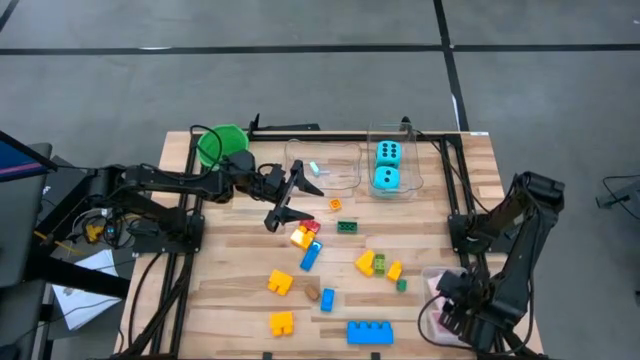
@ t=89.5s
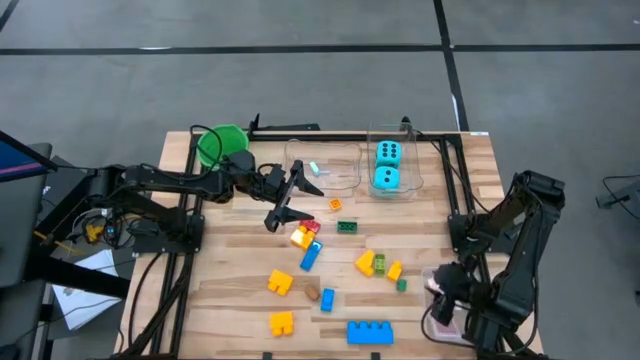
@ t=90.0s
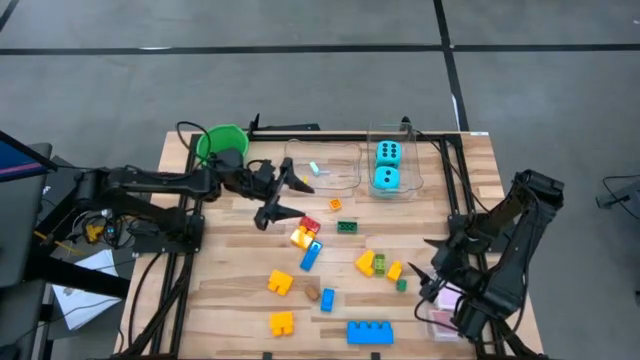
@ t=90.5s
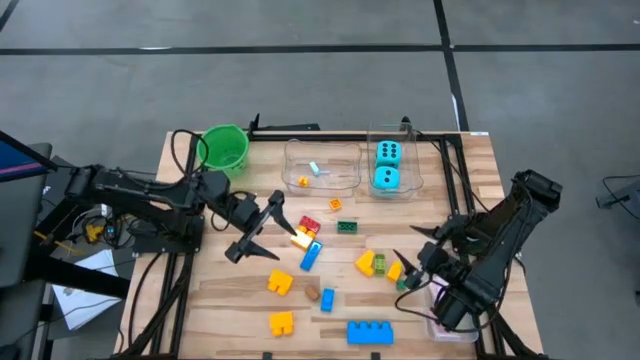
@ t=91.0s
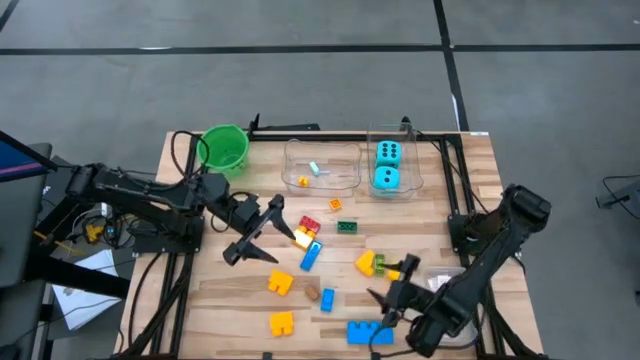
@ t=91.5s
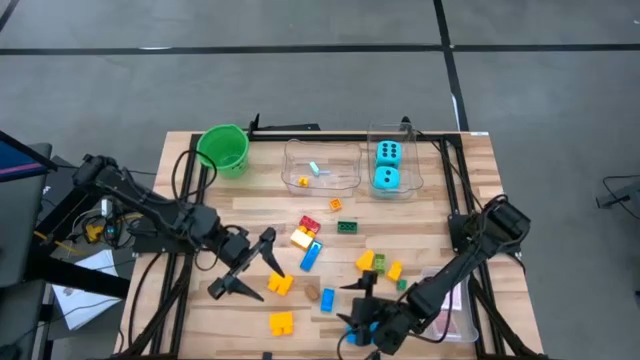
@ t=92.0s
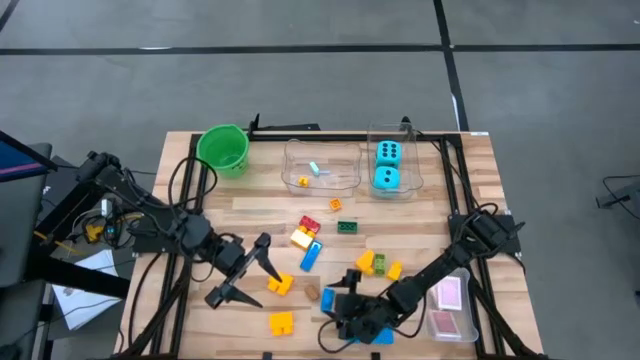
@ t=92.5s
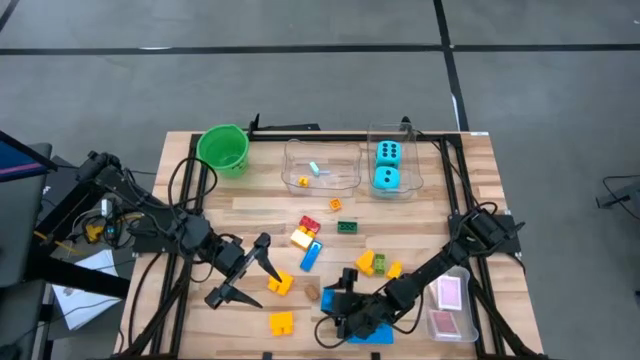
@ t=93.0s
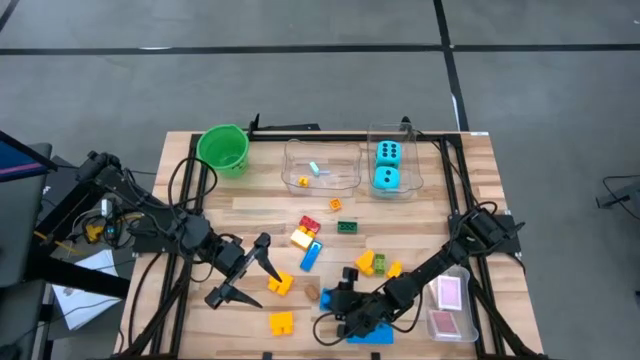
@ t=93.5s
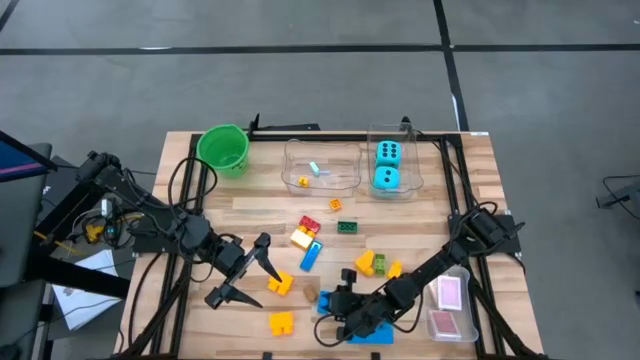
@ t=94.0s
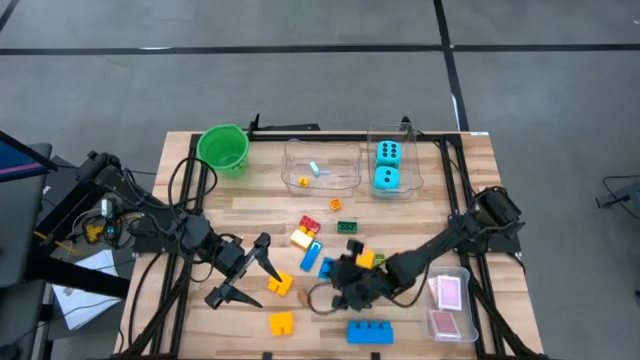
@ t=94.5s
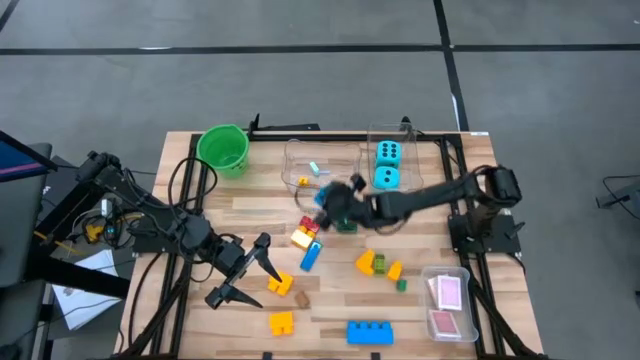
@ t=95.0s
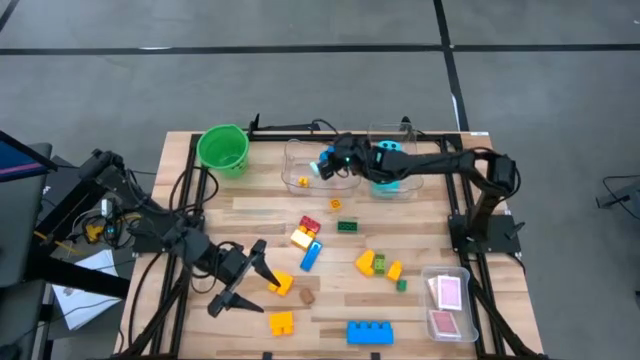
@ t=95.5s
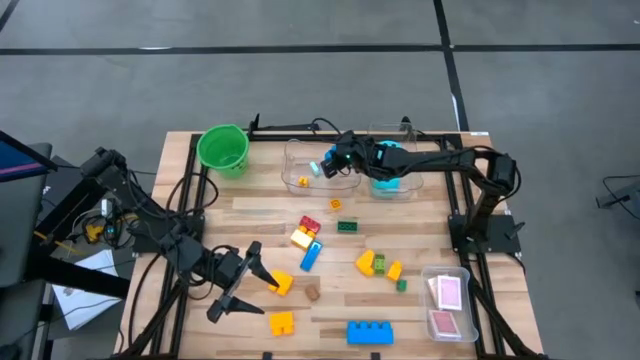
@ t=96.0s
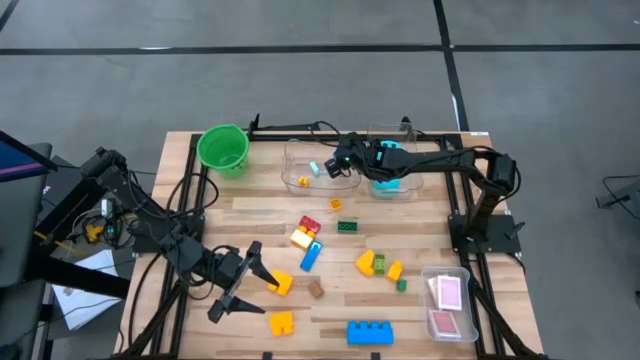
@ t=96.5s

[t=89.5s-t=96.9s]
Task: Pick & Place Toys
Put the blue gamepiece into the left transparent bin

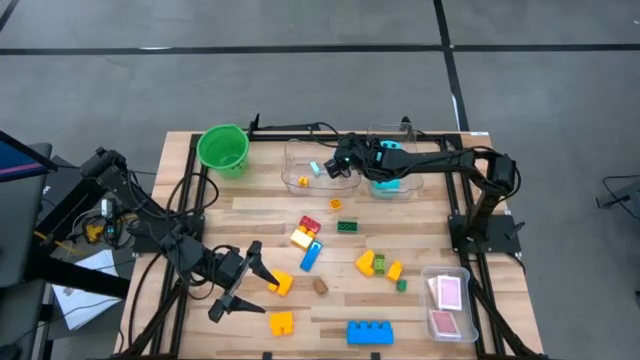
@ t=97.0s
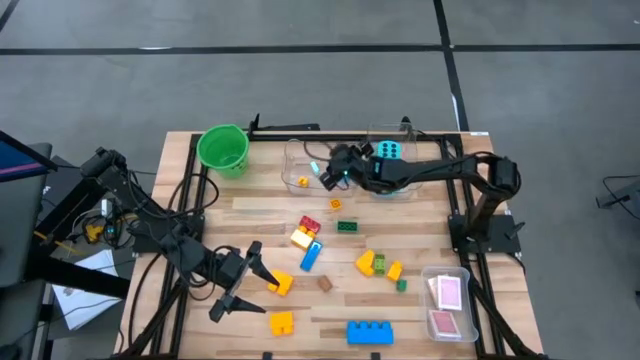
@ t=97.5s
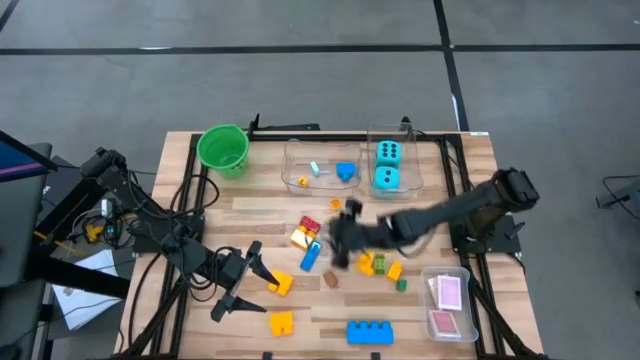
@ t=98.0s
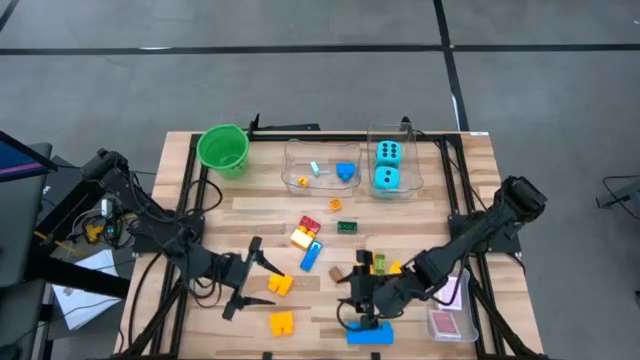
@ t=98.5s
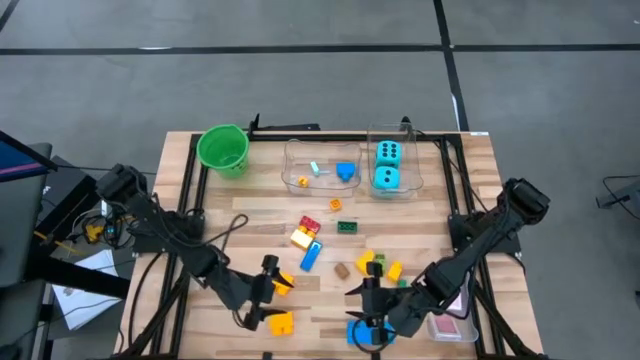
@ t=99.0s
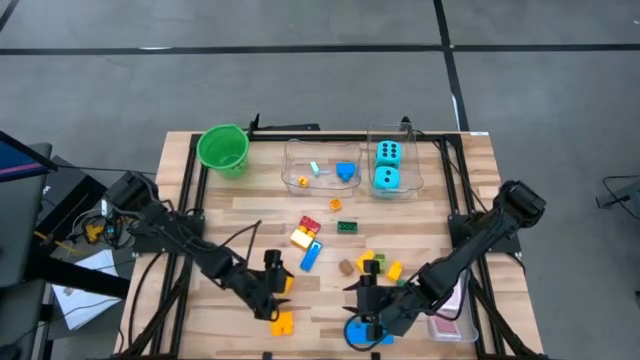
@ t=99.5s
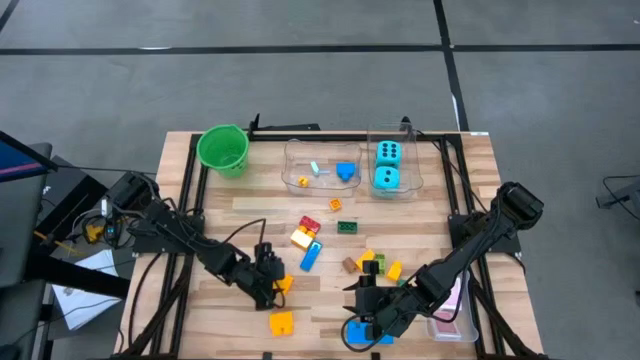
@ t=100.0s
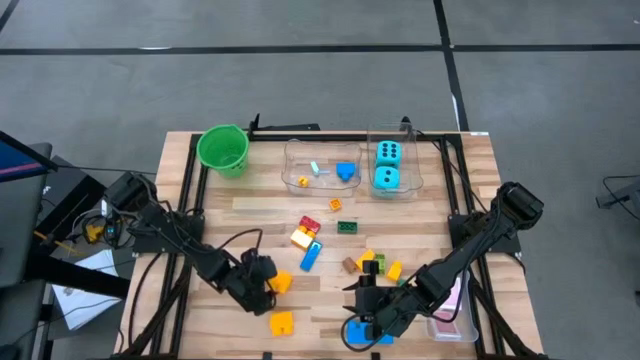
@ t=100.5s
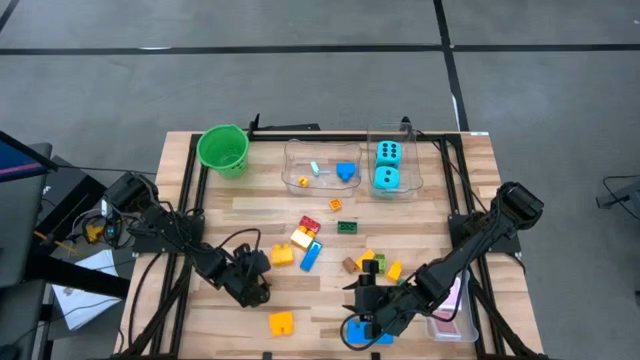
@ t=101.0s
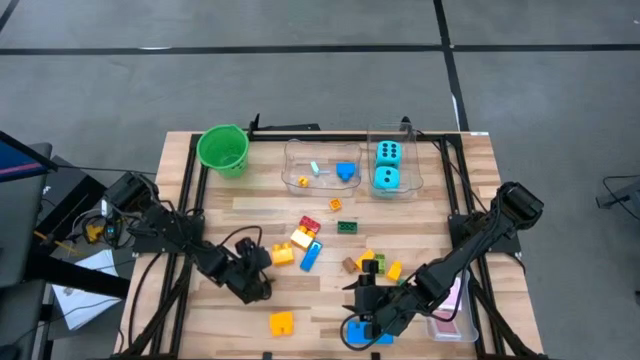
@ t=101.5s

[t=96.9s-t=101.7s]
Put the yellow gamepiece into the left transparent bin

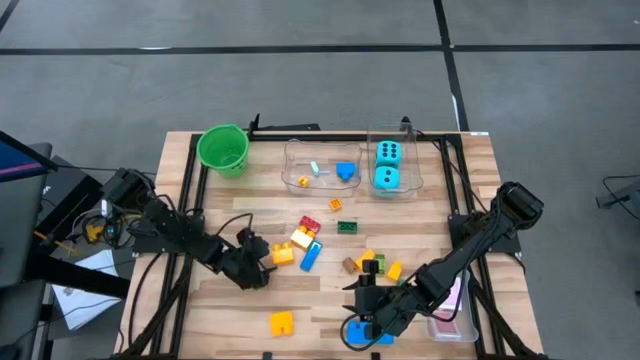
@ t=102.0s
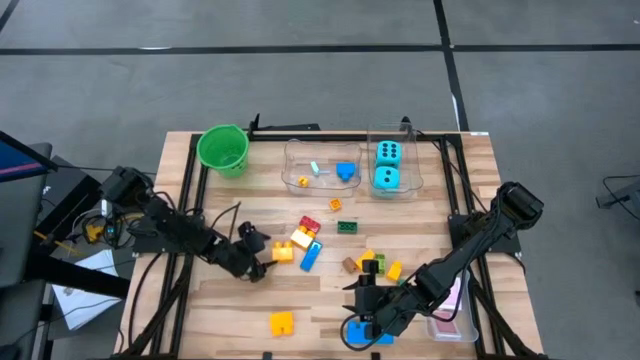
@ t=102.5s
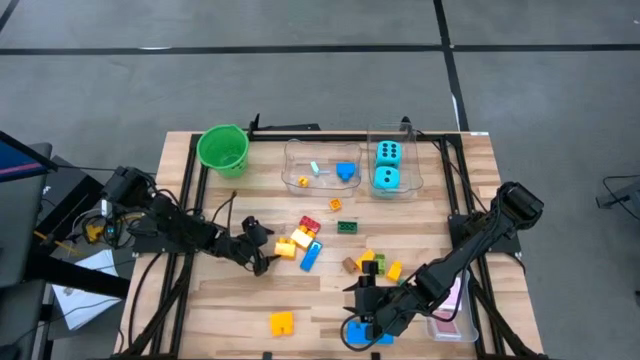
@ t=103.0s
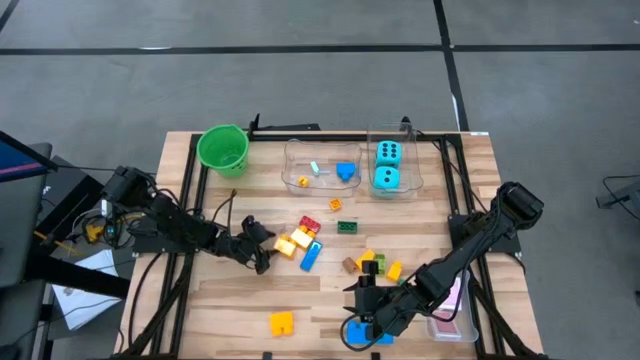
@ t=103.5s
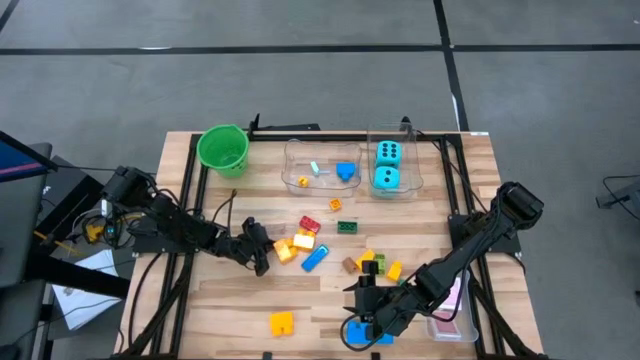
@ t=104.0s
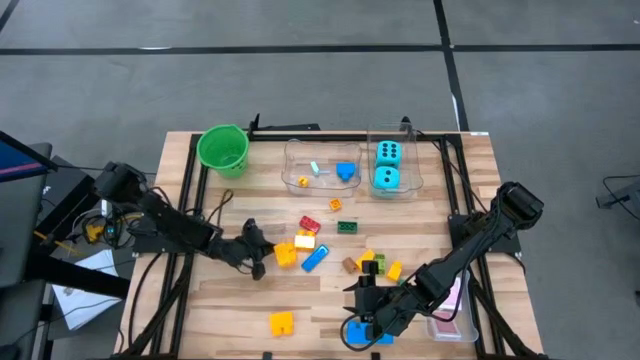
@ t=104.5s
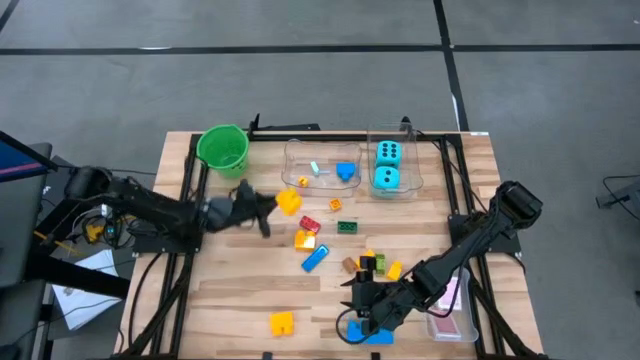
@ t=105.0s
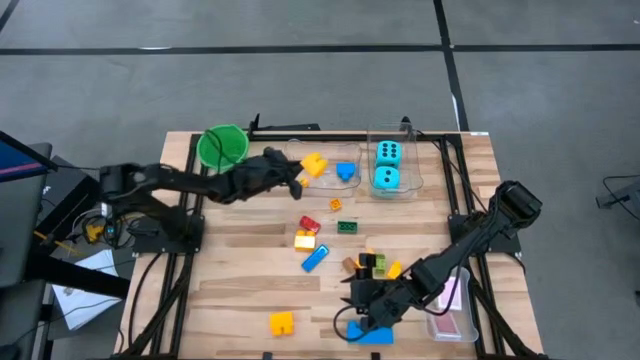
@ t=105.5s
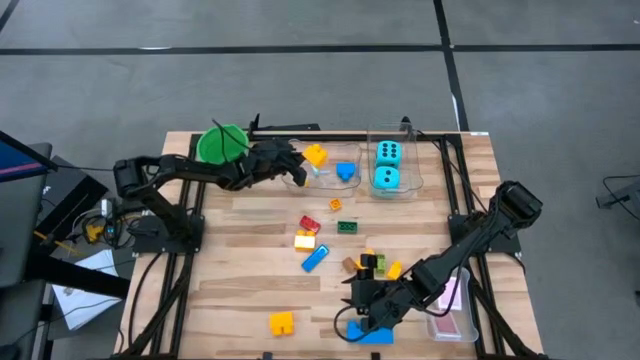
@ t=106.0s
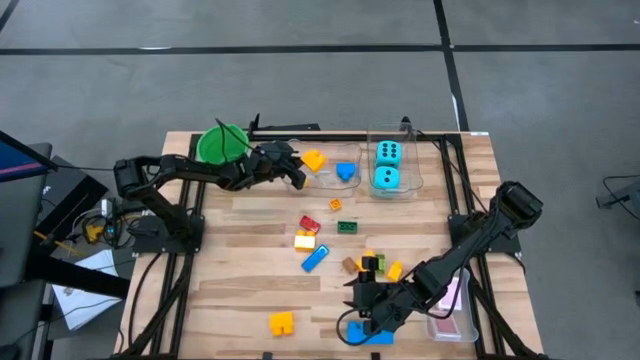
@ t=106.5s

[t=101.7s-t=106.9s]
Put the yellow gamepiece into the left transparent bin

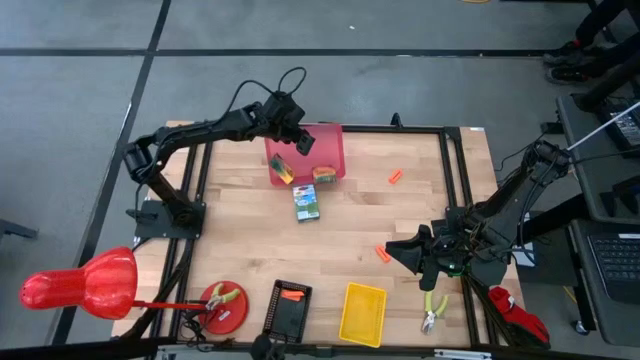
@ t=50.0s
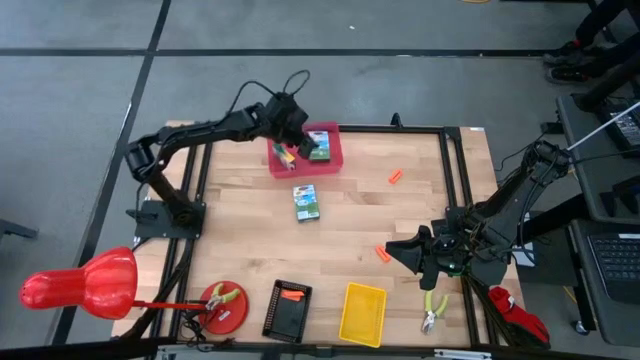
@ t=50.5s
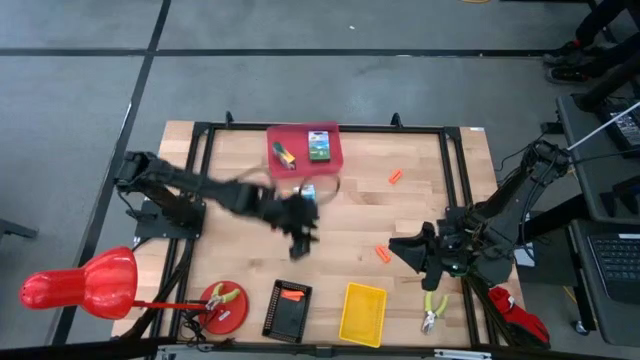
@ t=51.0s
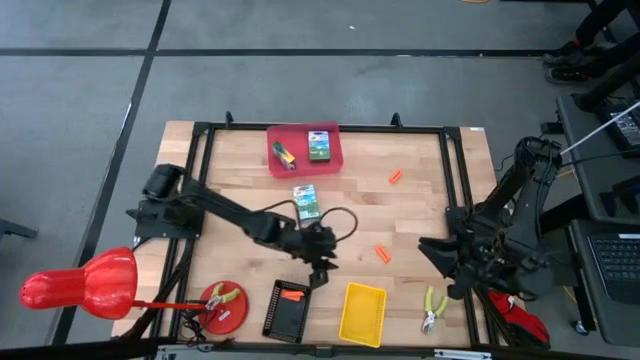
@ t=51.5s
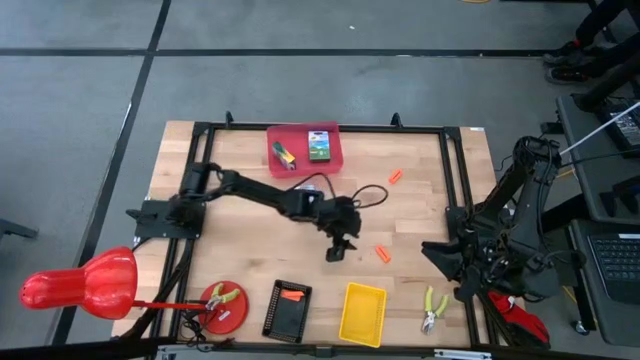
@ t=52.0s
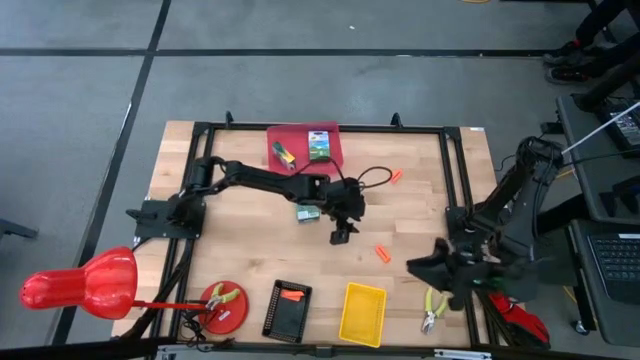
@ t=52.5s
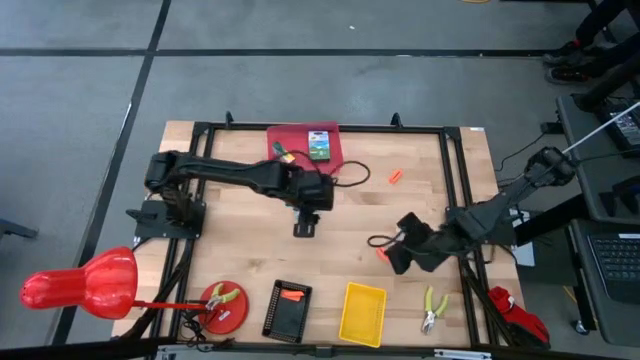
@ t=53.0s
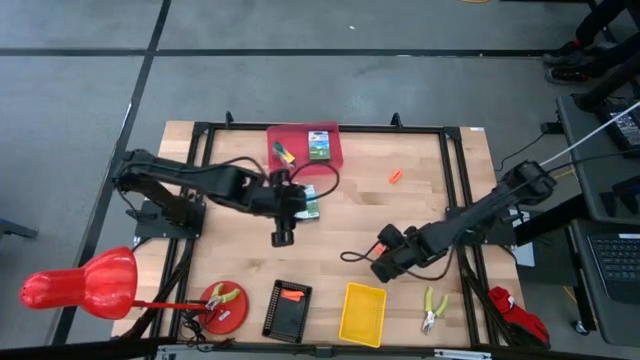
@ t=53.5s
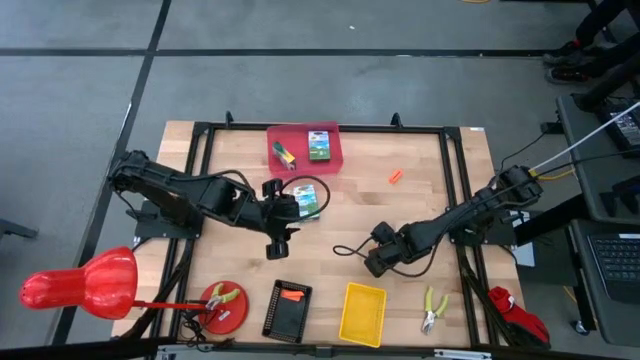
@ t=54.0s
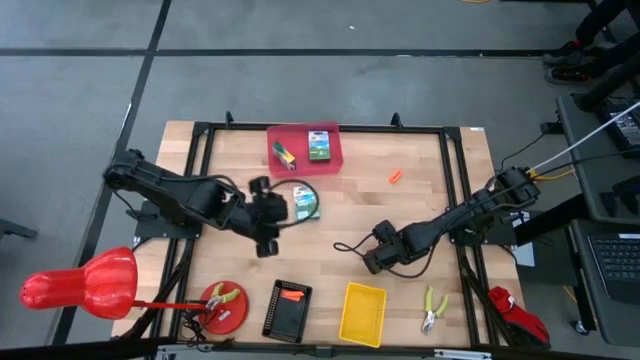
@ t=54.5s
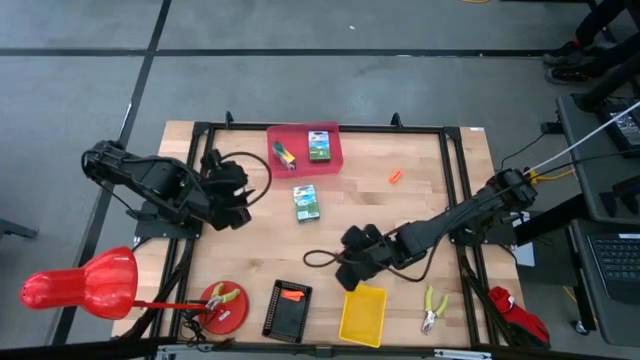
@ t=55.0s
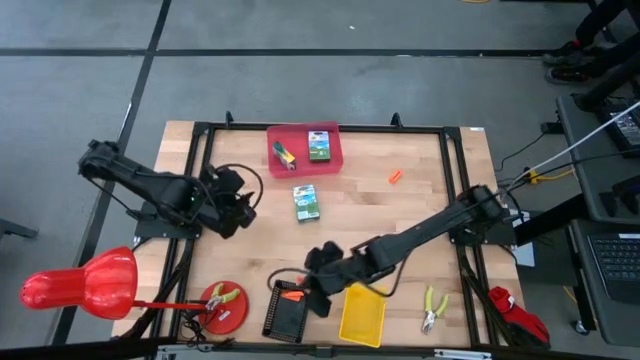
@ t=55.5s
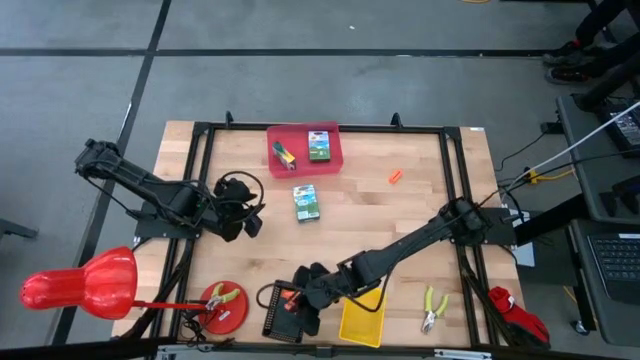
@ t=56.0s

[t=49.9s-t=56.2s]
Task: Pick & Place School Supplies
Put the orange eraser into the black bin
